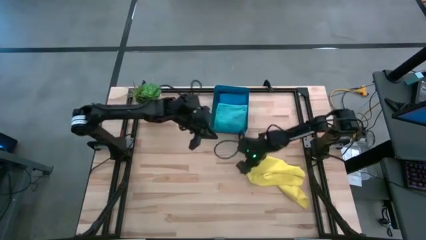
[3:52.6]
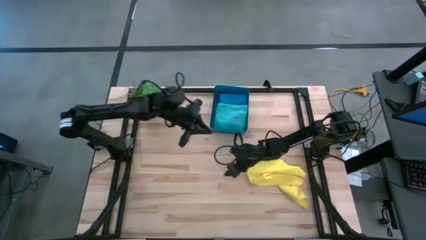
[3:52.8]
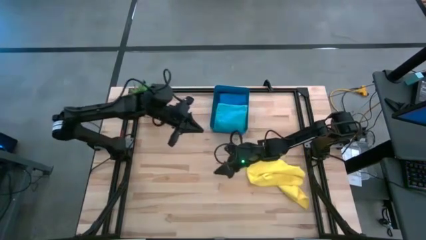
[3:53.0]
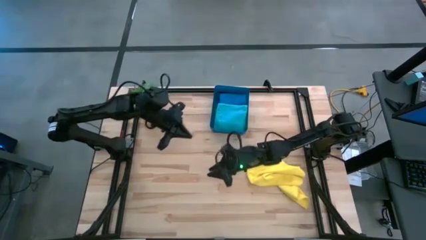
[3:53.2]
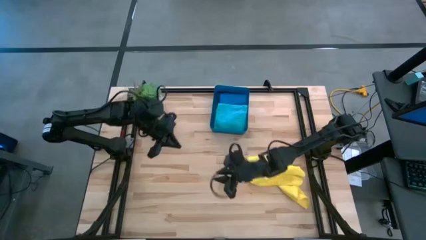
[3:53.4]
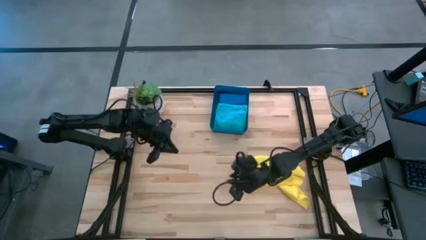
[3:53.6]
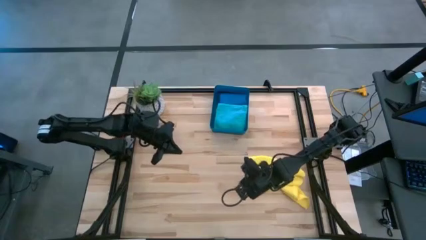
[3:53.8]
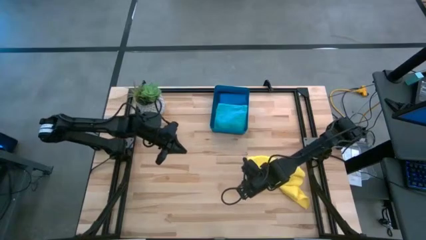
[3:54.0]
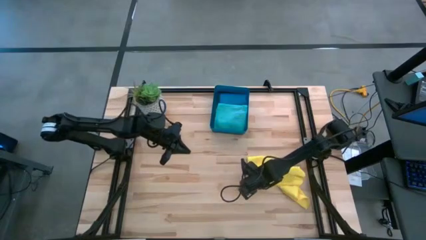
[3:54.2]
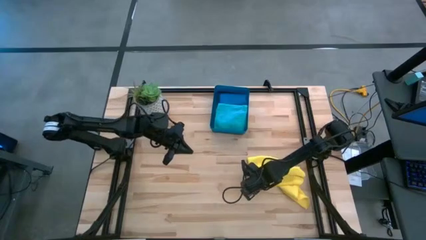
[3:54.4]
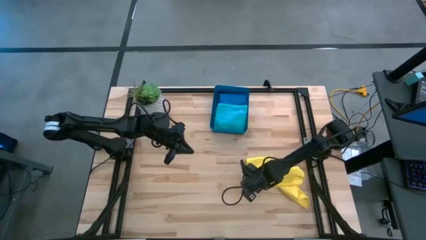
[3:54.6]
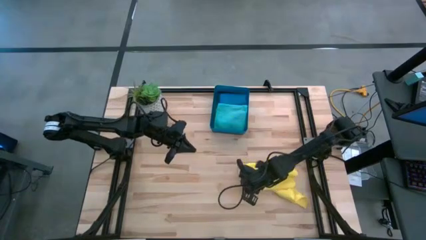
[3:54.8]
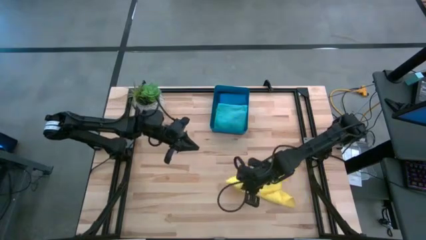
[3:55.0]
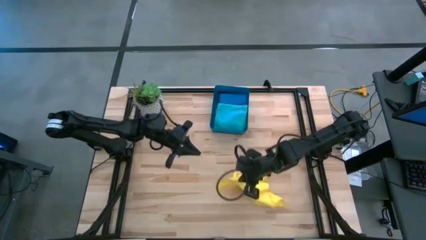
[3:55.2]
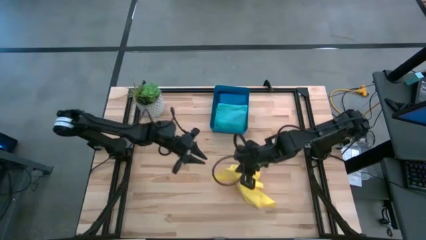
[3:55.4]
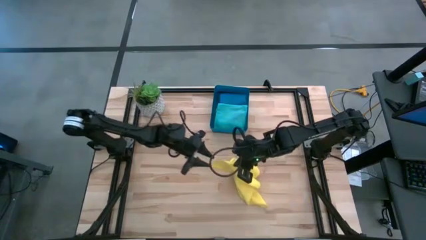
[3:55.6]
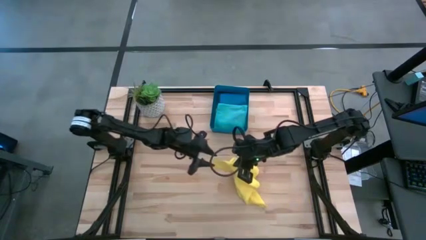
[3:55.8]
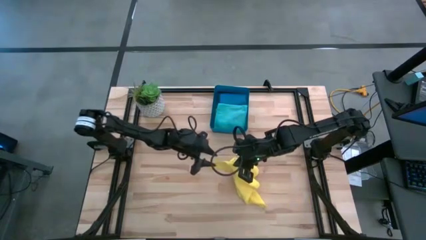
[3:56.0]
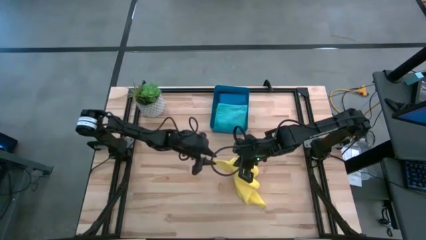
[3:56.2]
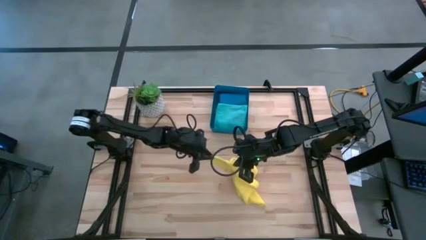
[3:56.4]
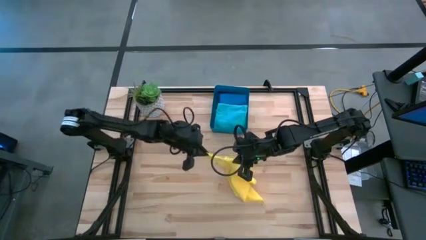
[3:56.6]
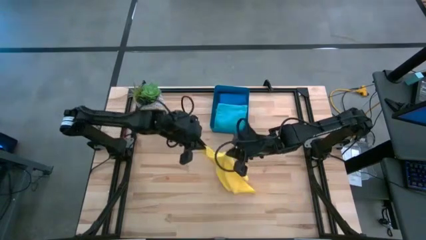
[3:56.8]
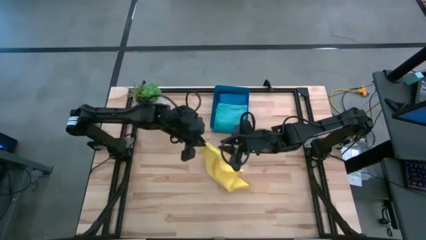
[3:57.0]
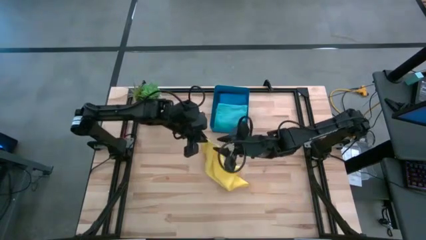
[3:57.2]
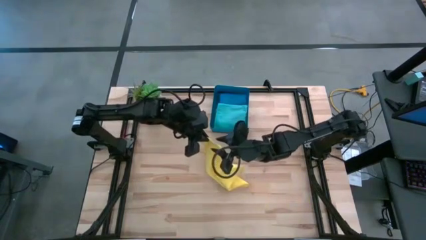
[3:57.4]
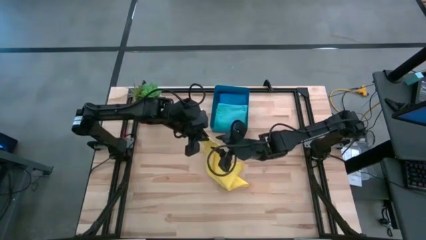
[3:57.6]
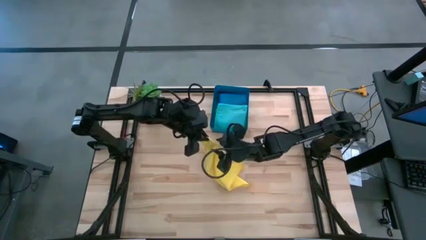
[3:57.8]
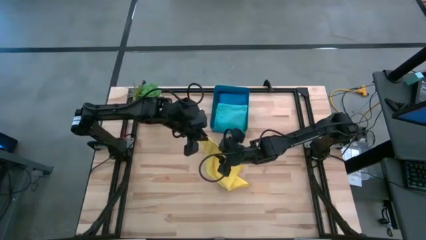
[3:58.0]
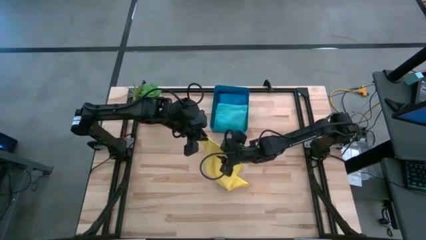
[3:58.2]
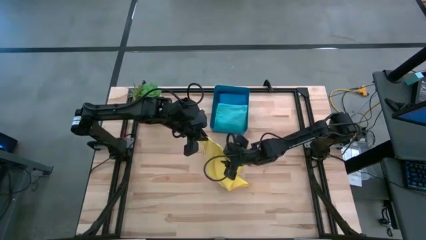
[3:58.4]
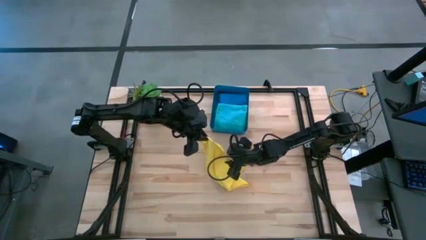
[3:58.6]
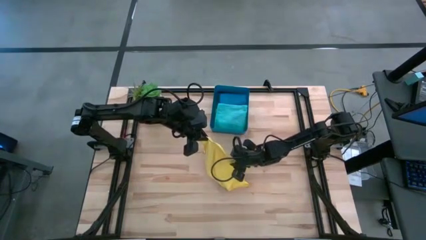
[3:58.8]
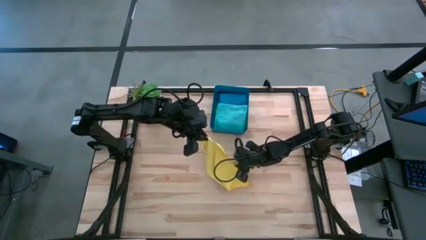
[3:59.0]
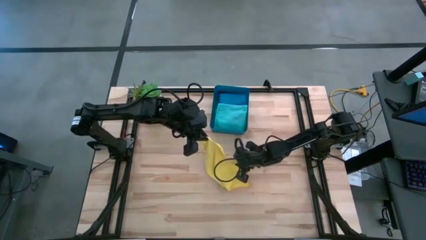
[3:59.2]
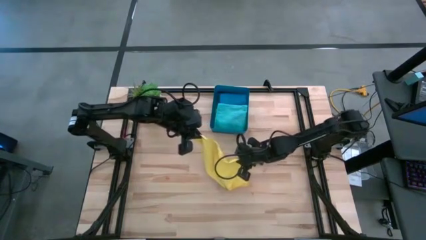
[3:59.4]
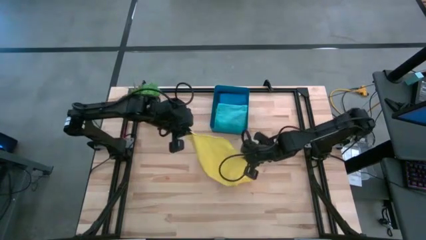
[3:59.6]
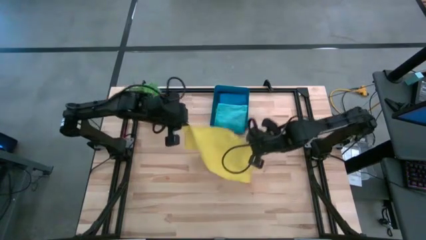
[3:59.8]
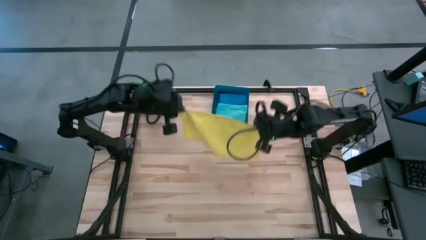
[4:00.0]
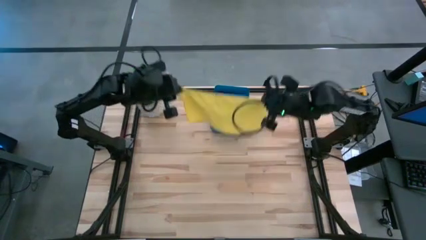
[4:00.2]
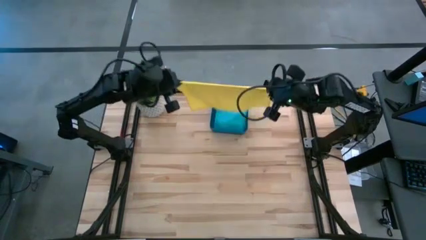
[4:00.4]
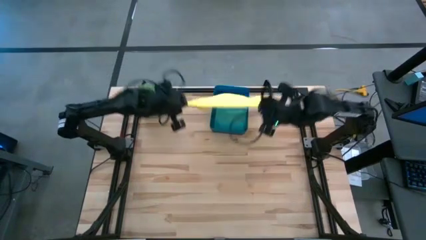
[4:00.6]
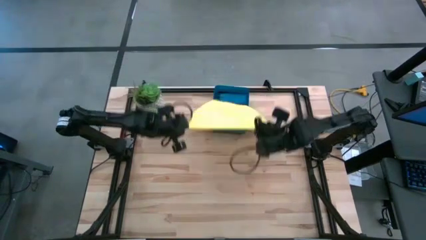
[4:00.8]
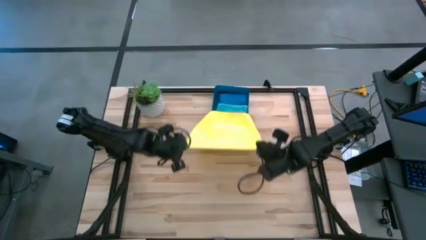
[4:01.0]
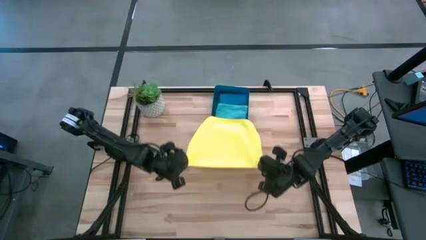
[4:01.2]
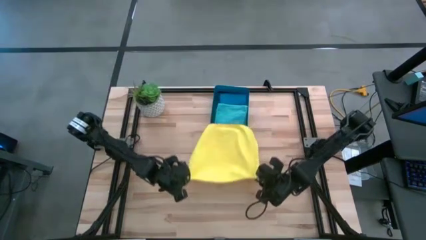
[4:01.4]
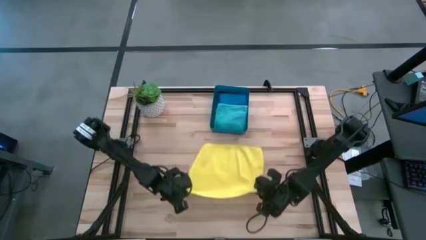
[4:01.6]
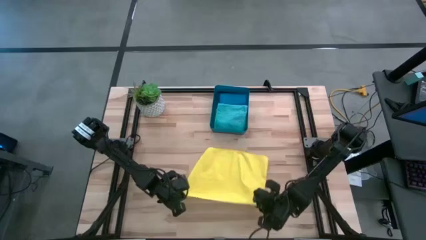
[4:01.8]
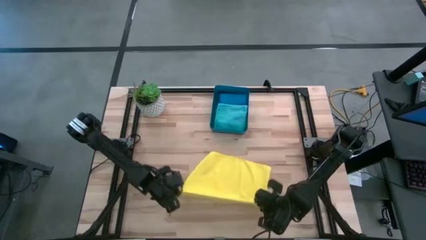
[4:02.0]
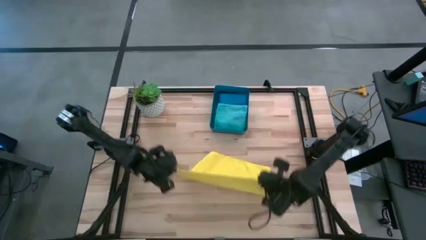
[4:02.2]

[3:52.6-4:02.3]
Task: Fold microfiber towels
Fold the yellow microfiber cloth

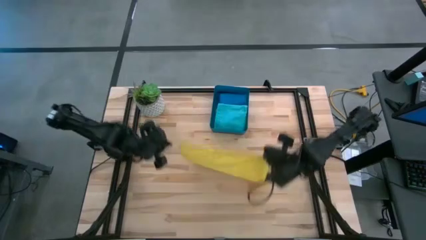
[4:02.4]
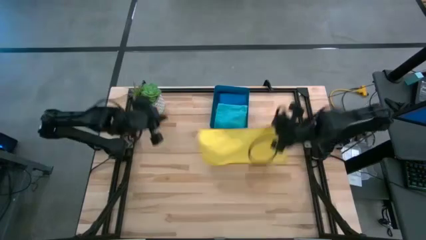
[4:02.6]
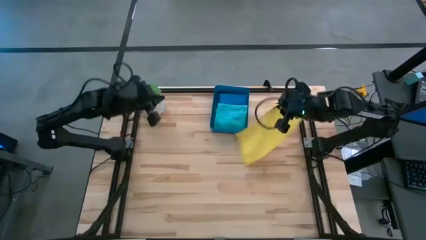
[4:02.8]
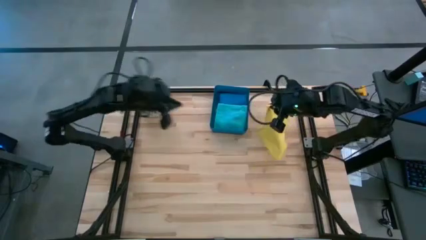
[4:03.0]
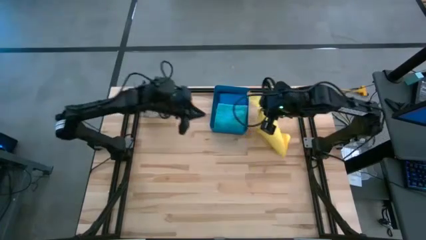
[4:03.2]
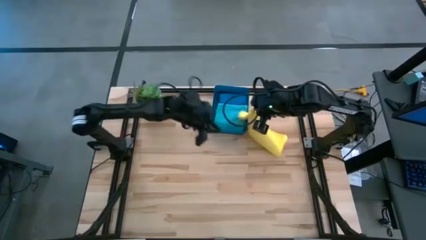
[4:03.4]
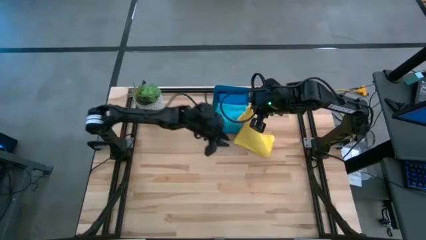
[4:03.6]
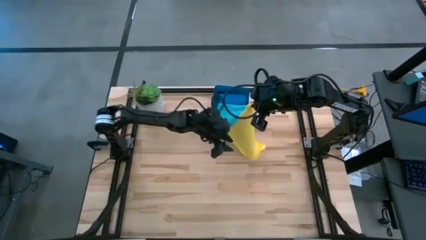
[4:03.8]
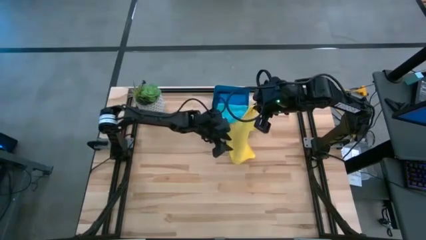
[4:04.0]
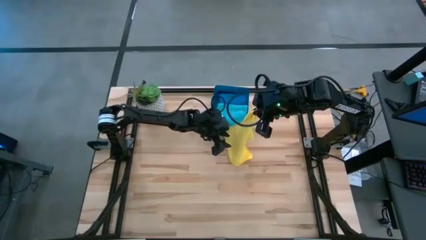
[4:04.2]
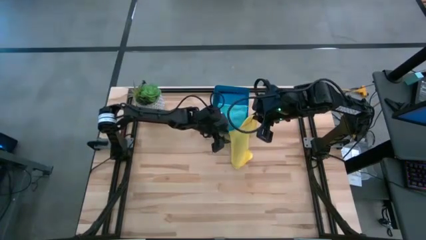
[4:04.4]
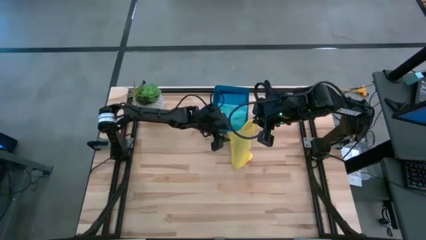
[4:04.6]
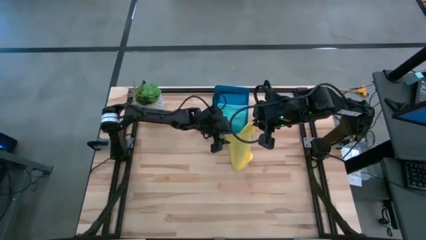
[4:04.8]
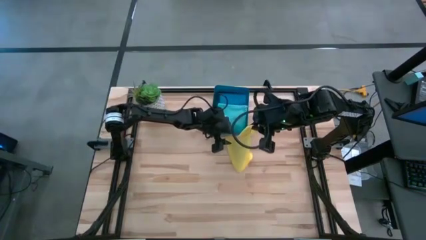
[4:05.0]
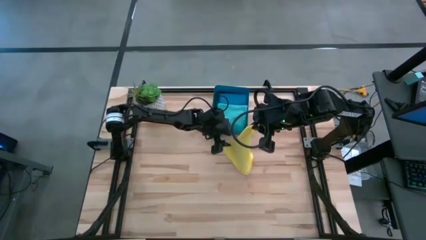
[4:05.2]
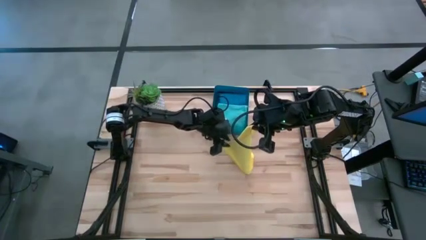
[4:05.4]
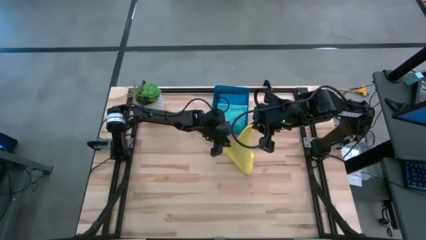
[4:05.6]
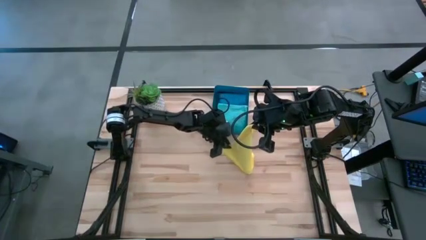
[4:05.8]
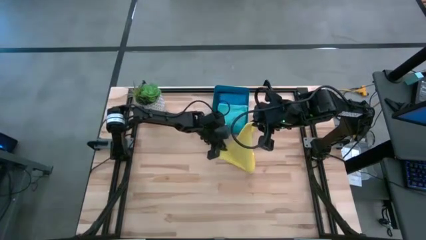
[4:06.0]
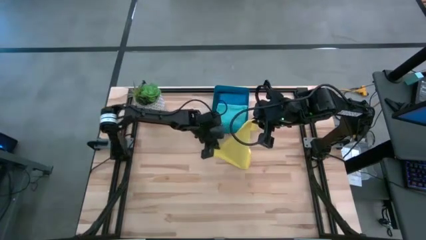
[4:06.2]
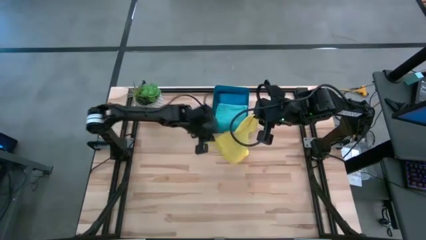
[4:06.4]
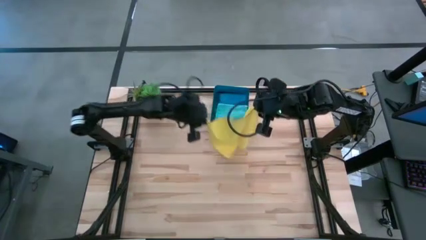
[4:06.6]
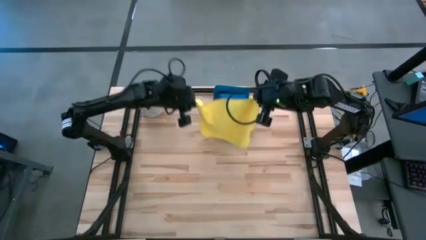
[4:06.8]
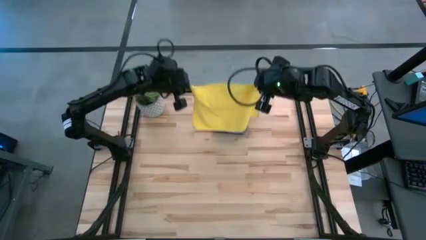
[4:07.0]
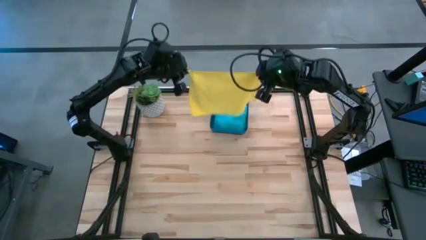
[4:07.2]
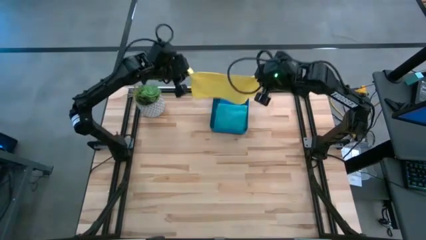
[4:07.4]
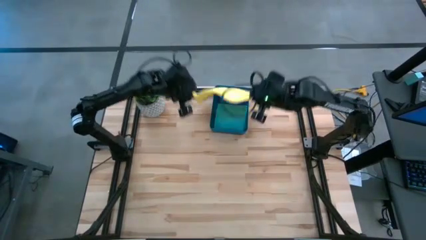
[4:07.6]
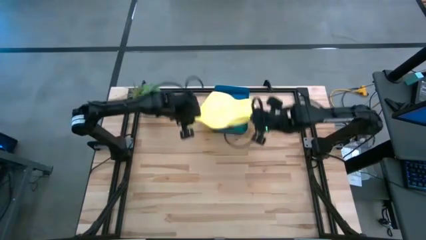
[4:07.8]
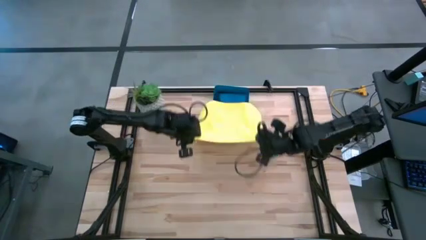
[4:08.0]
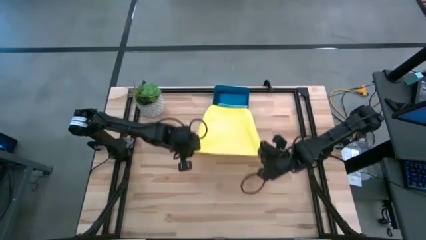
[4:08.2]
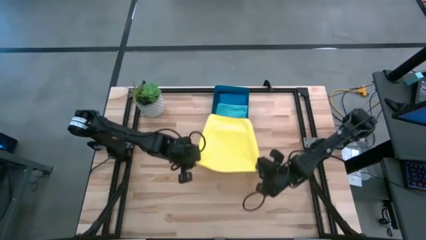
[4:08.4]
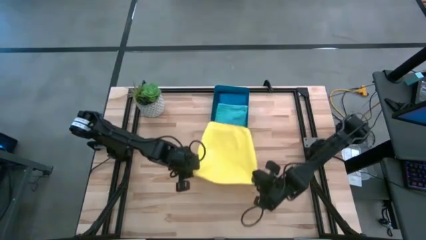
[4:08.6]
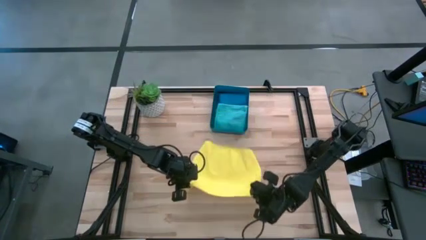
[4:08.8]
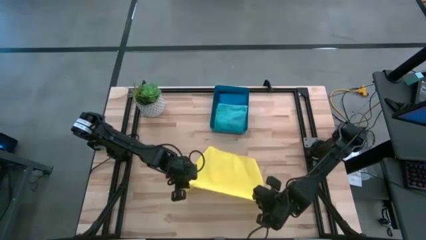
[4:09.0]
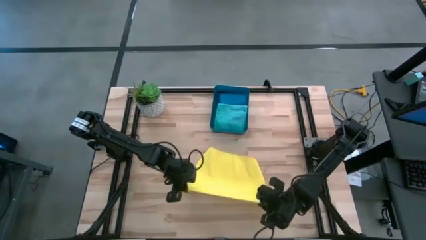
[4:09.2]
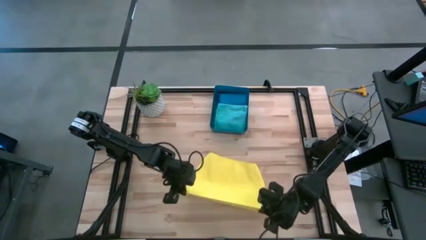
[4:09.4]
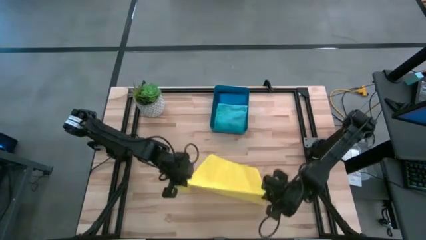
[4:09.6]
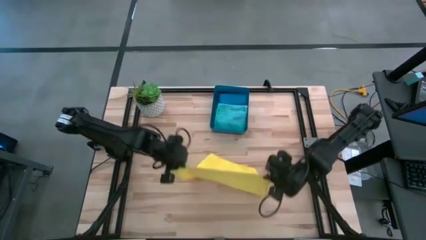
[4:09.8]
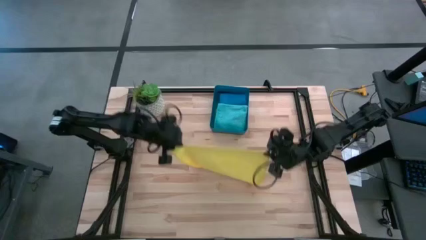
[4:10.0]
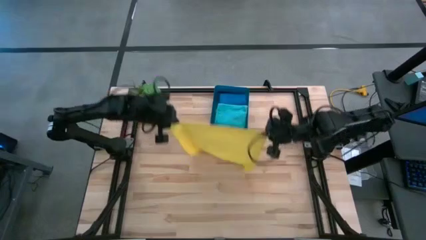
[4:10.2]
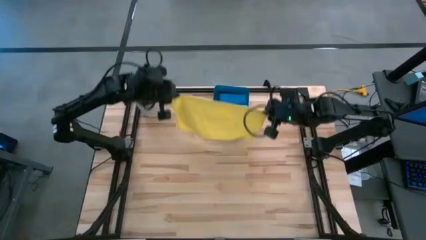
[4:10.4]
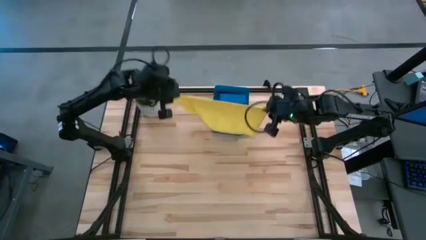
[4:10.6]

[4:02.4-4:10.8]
Fold the yellow microfiber cloth
